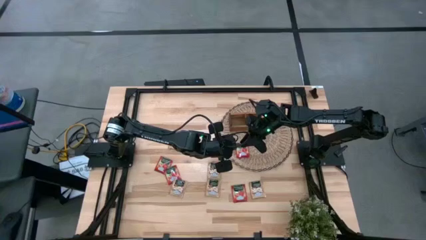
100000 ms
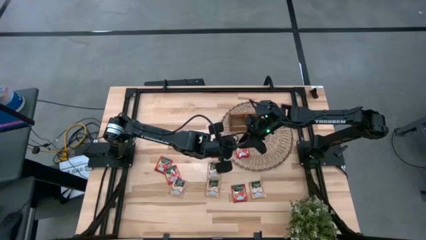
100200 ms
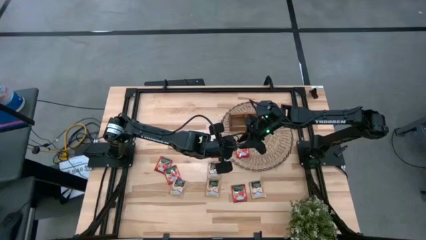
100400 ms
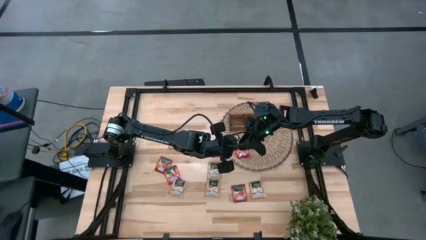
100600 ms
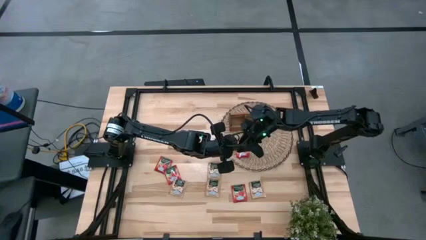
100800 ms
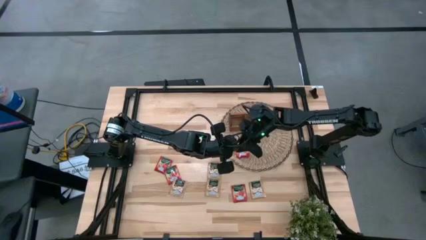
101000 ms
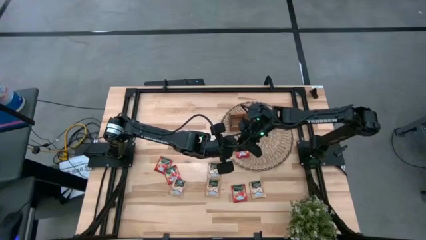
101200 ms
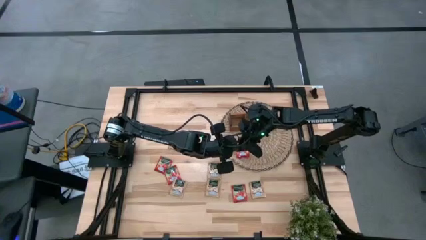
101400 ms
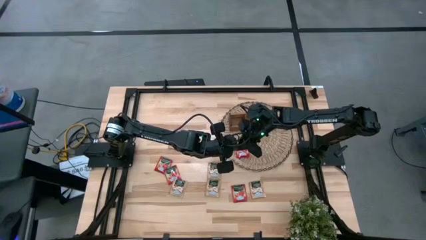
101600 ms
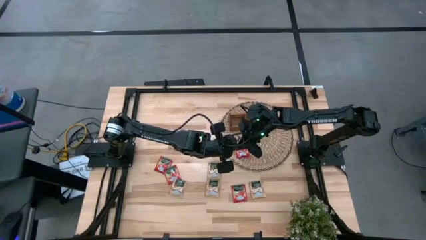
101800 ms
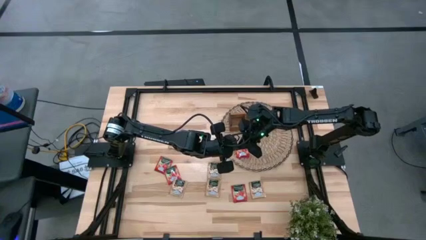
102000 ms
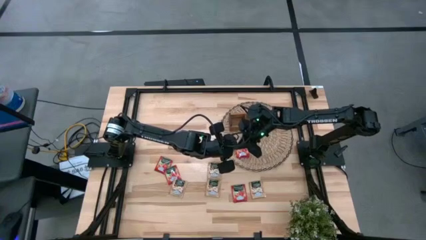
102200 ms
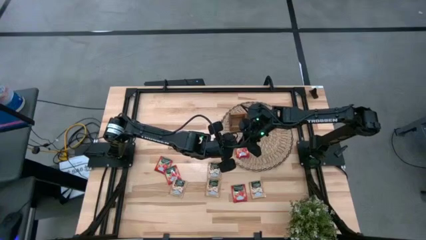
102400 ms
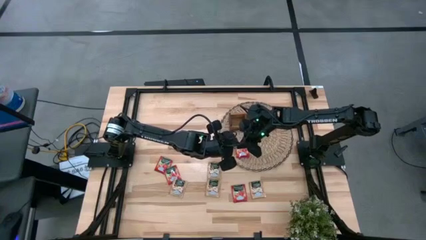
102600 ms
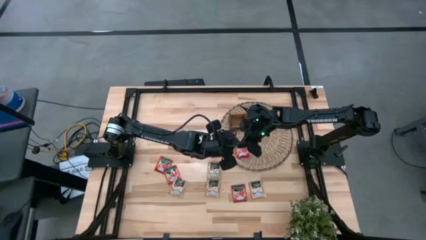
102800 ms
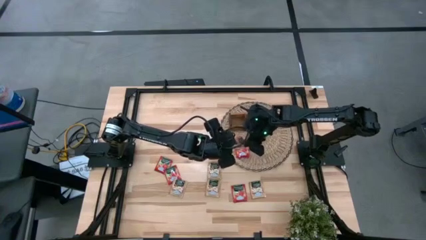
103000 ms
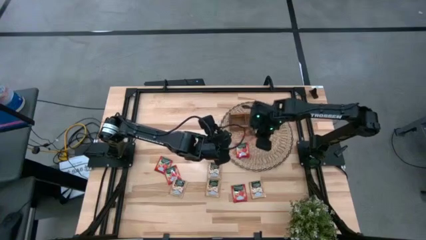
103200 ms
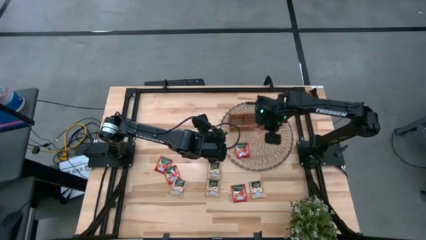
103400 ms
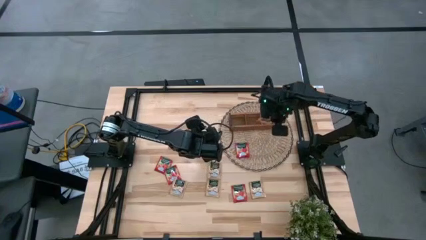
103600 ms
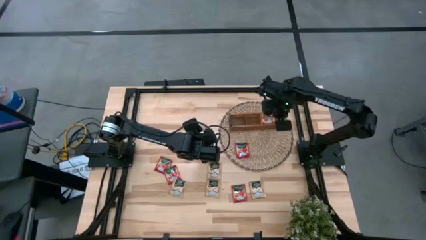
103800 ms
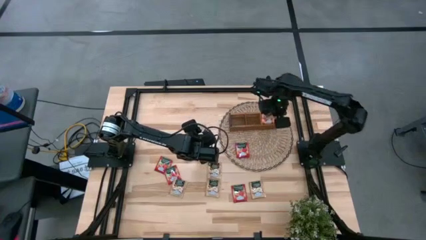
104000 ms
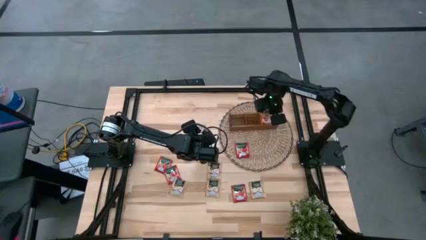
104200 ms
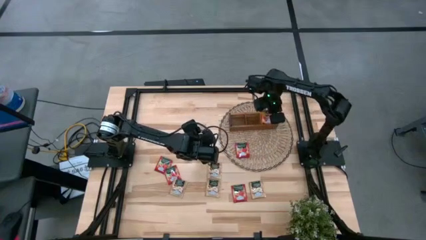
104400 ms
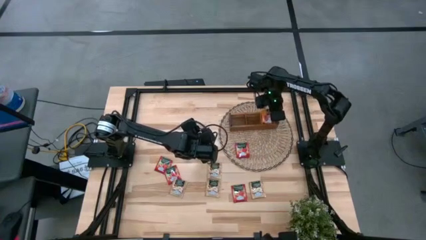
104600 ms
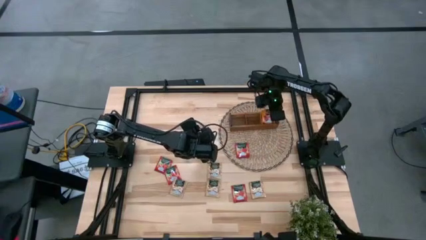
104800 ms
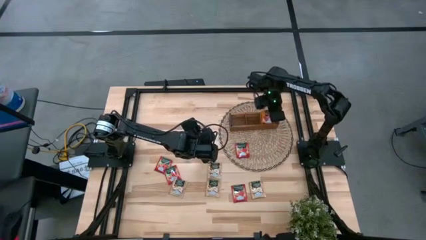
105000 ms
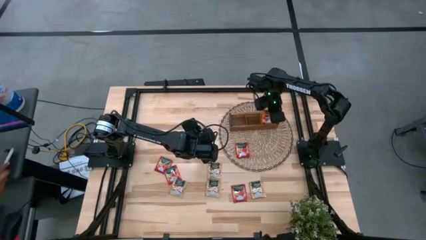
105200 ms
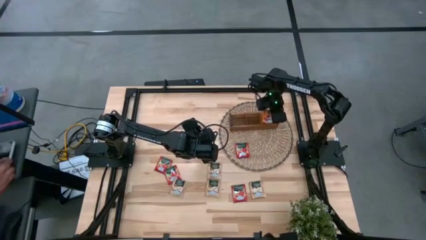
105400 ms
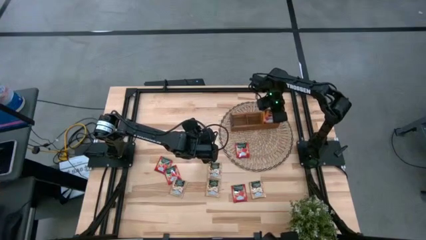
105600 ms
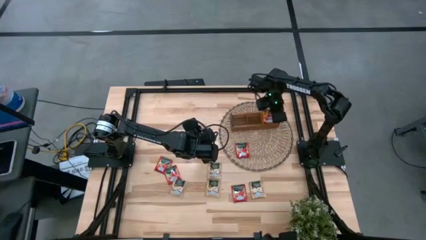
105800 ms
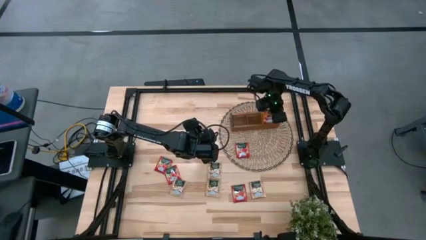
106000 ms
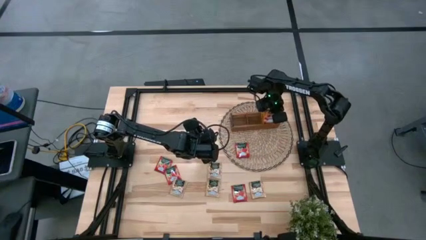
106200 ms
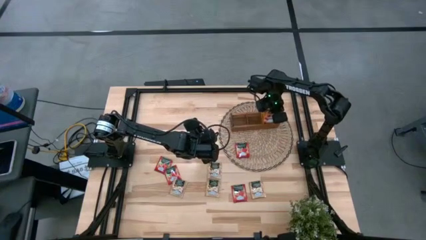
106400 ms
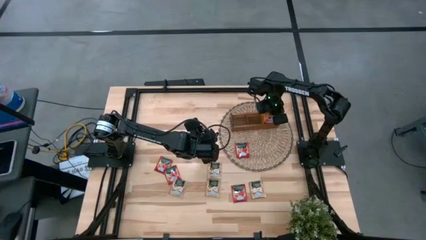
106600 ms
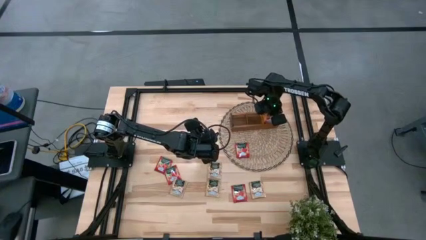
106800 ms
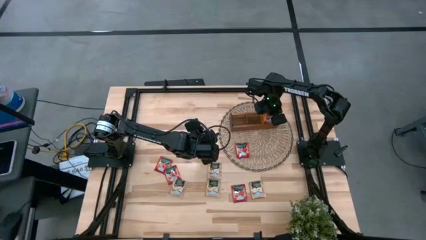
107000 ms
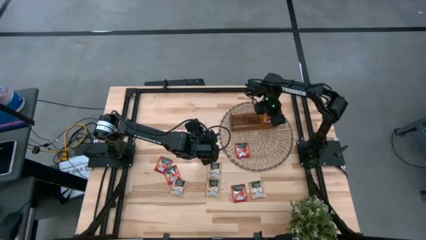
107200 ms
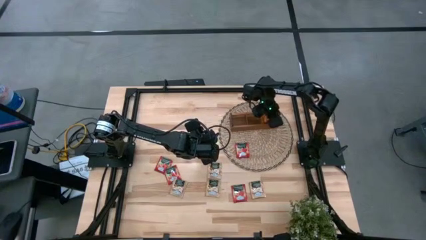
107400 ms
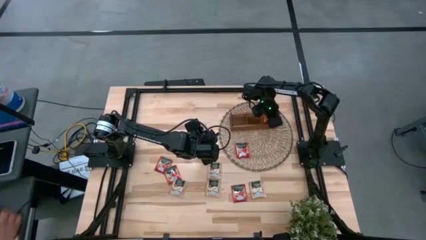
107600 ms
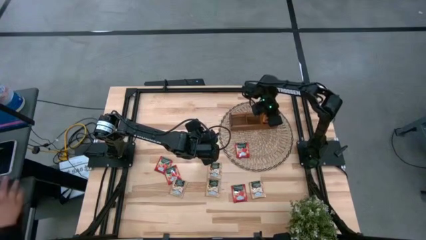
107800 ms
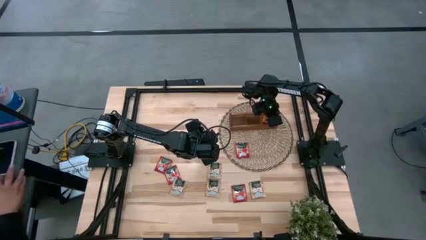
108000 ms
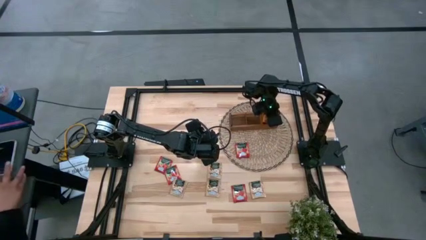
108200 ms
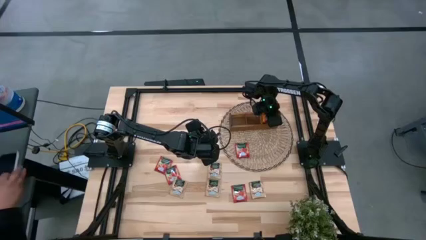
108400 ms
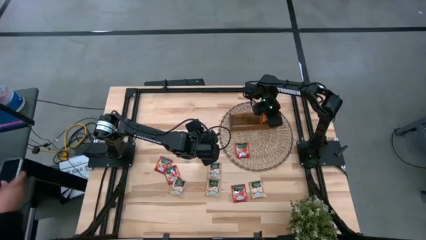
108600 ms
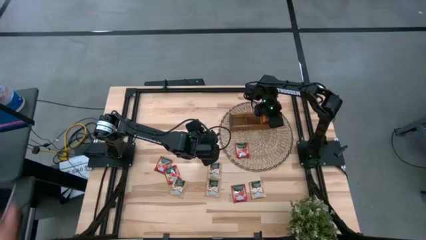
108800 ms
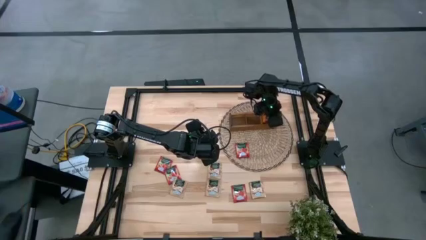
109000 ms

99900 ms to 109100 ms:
Task: Pick & Place Tea
Put the orange tea pack into the right compartment of the brown organizer
